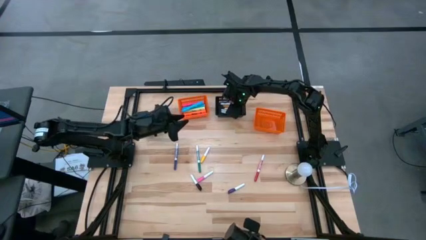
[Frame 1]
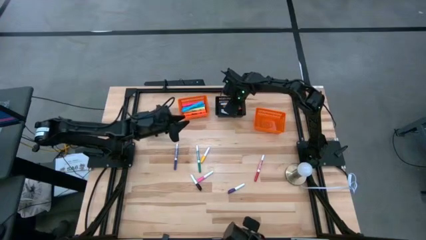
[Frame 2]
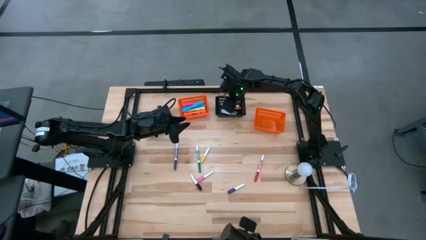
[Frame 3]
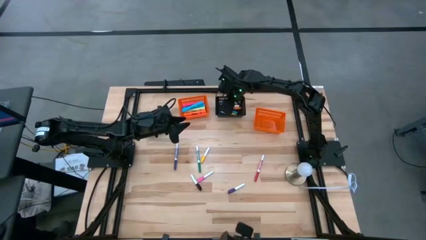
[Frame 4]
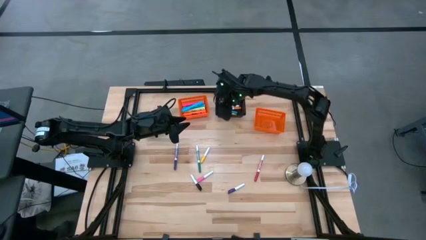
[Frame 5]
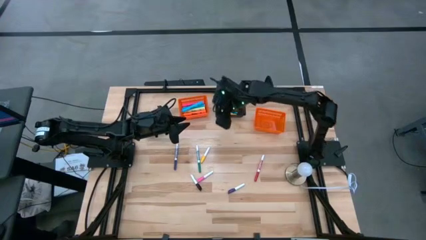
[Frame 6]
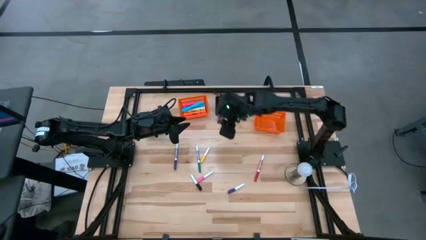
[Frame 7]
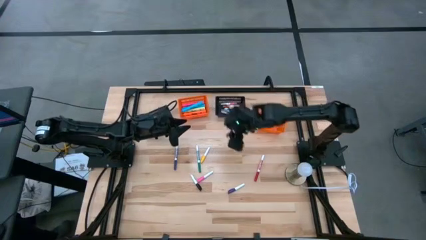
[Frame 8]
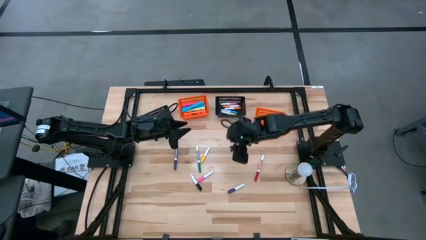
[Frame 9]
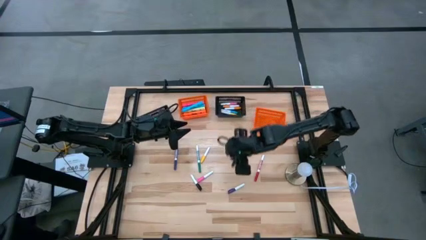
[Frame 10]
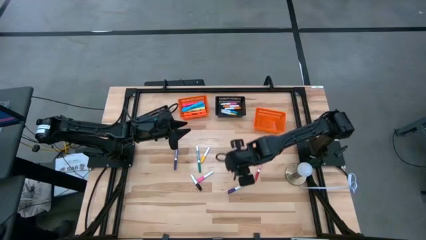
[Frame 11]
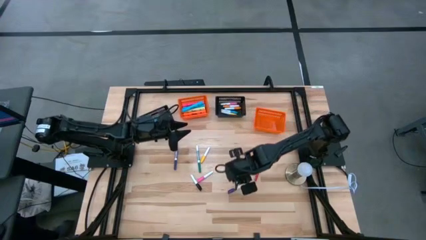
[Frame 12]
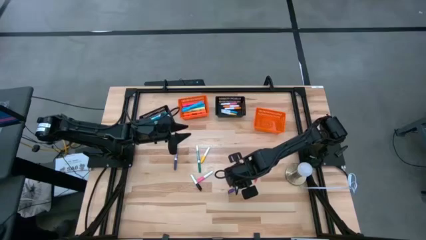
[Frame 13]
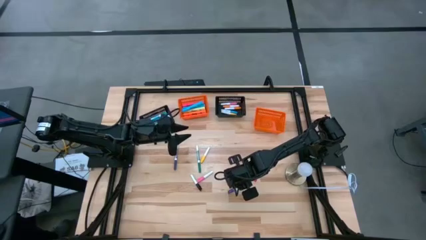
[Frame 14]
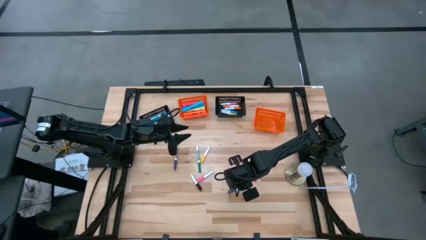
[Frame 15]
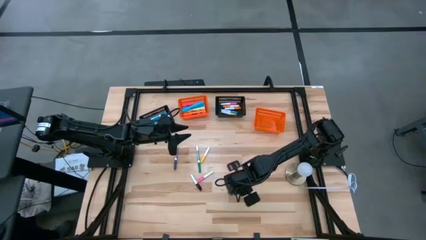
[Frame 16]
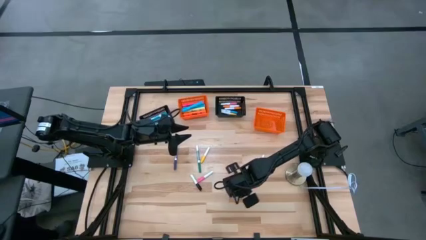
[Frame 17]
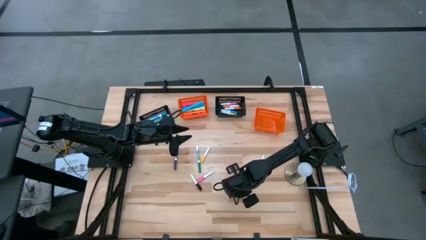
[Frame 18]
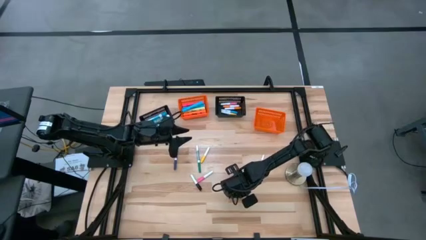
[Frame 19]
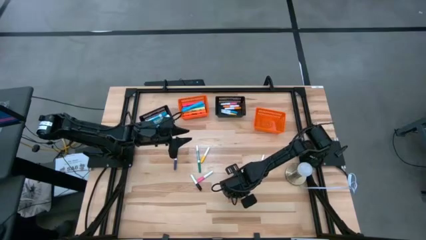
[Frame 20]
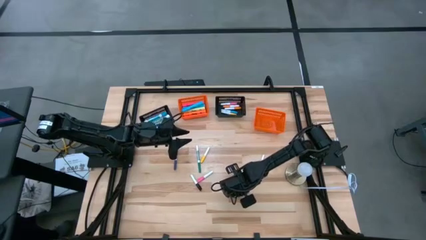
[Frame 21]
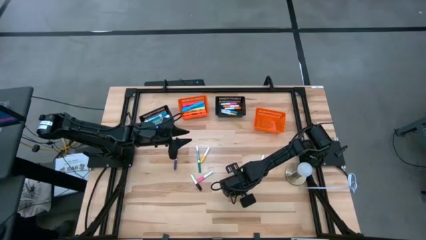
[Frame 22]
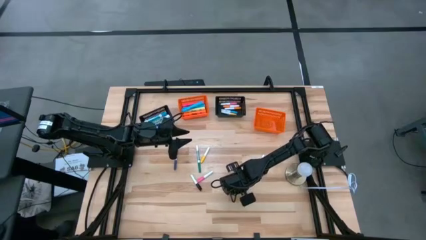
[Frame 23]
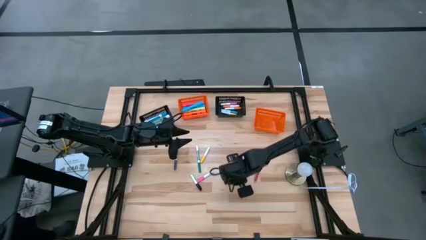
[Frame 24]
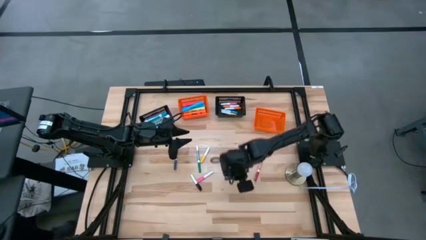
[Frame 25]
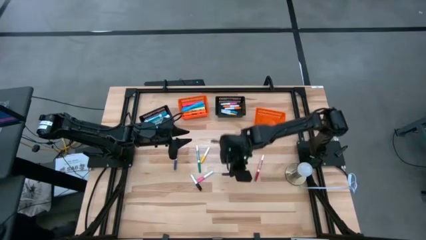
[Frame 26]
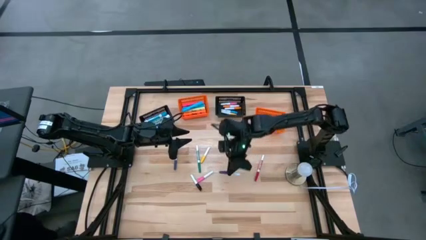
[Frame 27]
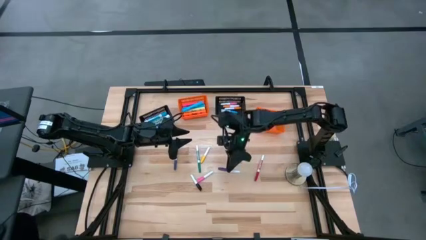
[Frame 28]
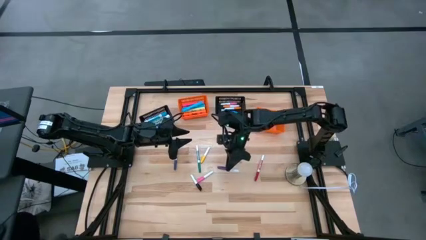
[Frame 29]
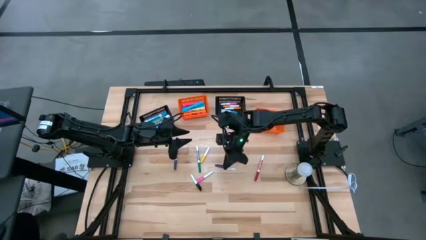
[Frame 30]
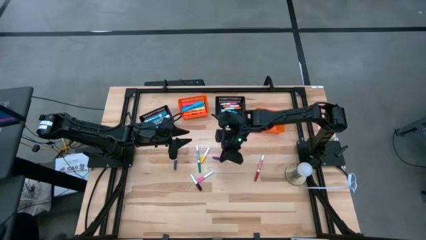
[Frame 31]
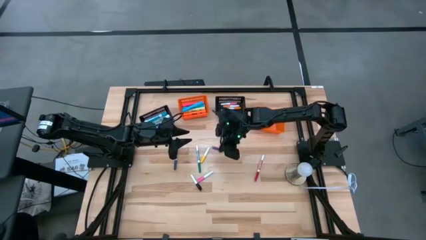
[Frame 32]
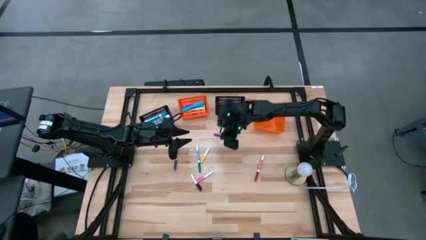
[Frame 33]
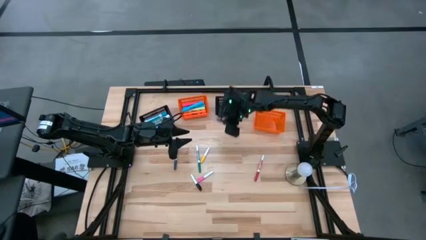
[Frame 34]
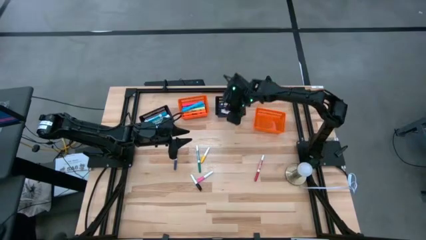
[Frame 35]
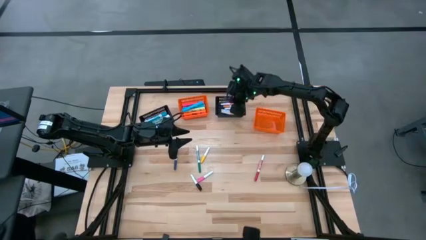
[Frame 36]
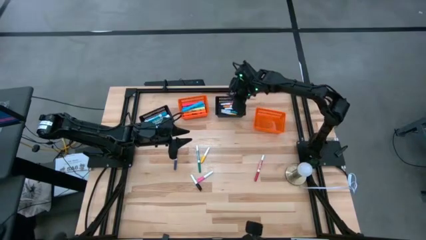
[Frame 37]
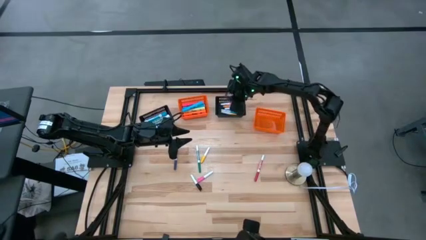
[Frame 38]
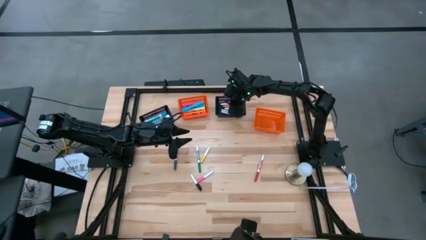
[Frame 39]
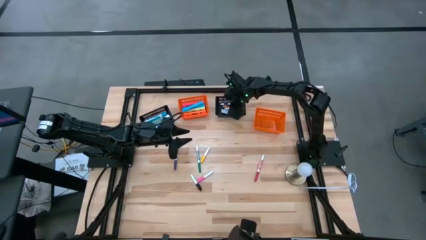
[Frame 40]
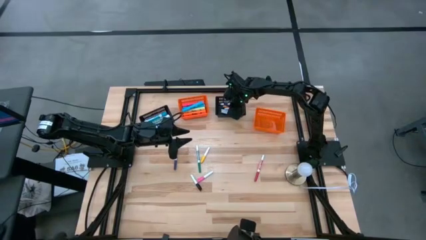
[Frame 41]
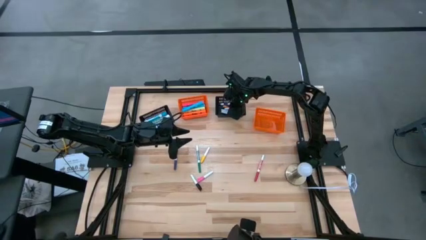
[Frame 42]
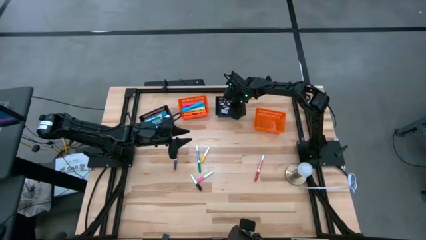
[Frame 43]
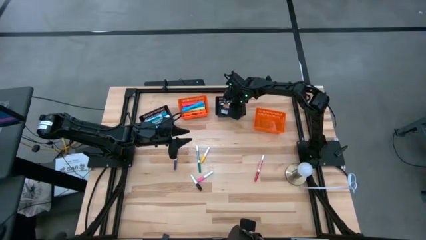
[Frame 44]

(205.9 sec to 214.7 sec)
Task: Pick & Place Markers
Put the small purple highlighter pen into the right black bin

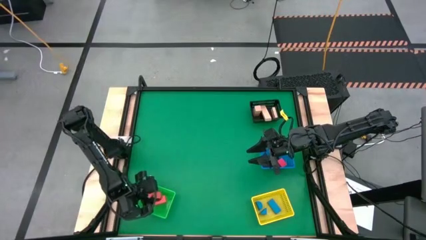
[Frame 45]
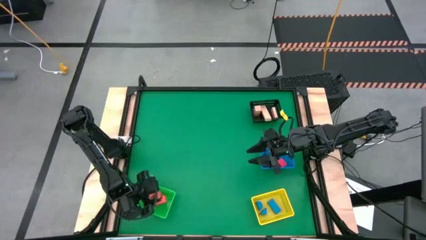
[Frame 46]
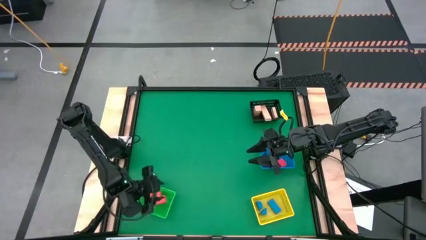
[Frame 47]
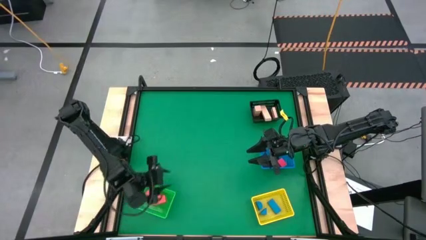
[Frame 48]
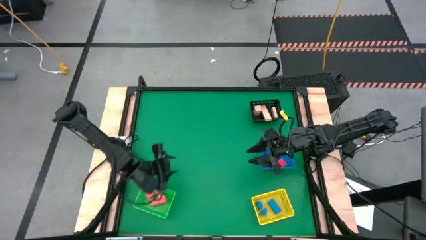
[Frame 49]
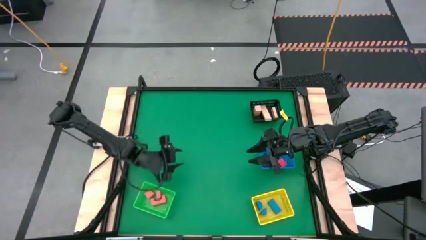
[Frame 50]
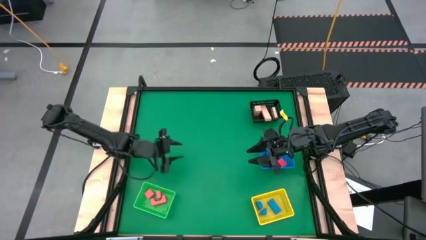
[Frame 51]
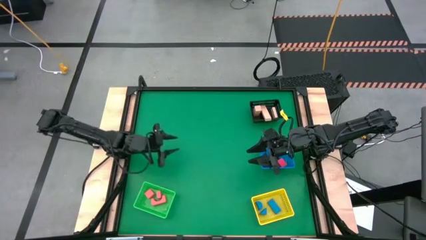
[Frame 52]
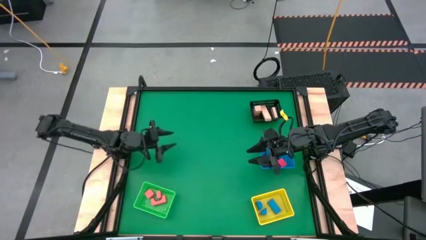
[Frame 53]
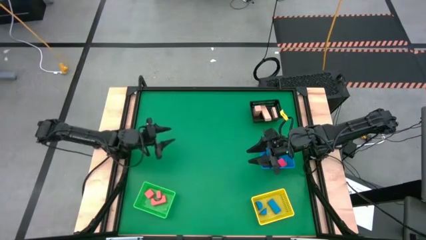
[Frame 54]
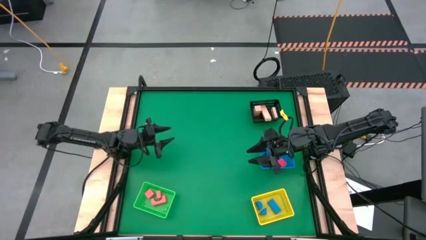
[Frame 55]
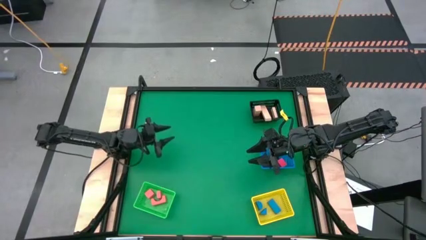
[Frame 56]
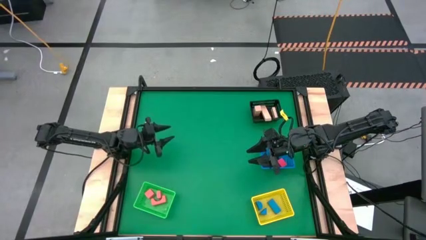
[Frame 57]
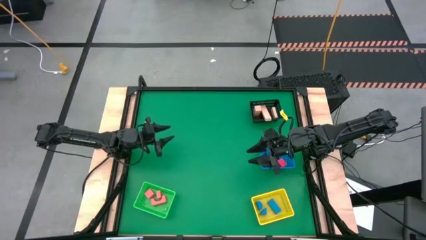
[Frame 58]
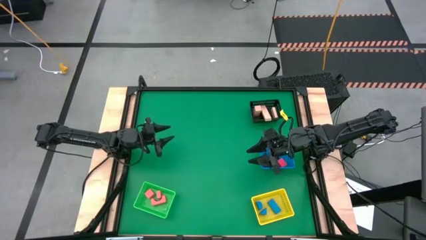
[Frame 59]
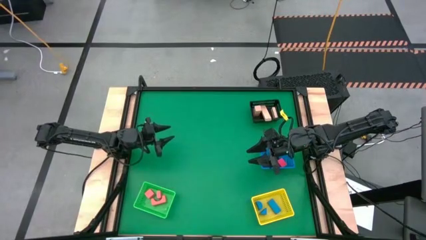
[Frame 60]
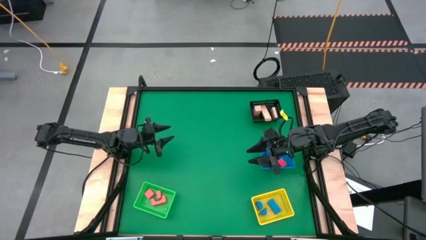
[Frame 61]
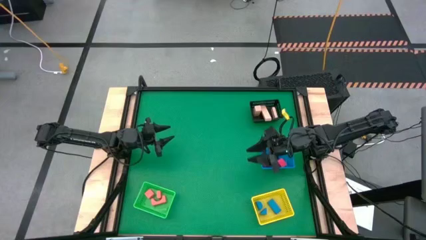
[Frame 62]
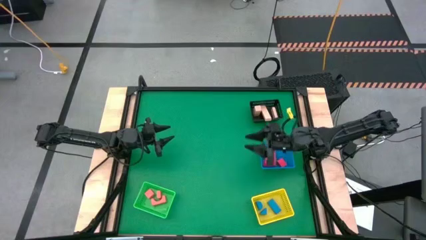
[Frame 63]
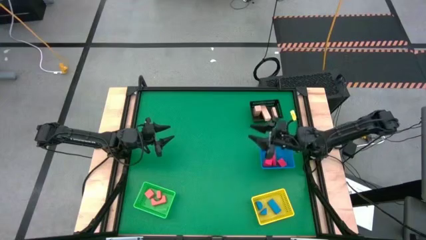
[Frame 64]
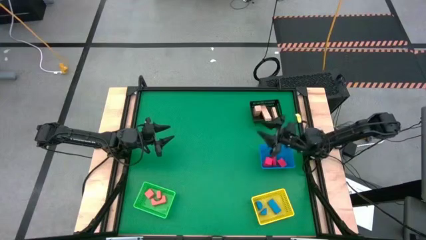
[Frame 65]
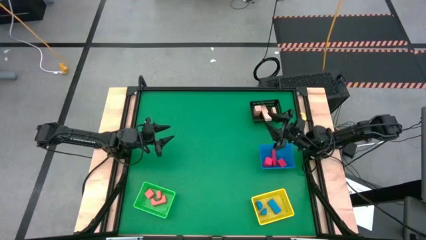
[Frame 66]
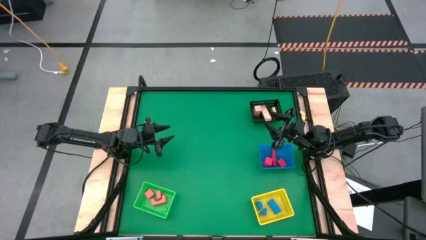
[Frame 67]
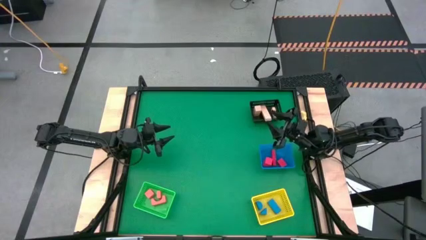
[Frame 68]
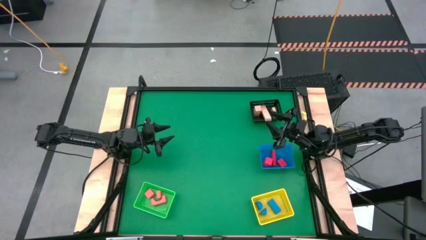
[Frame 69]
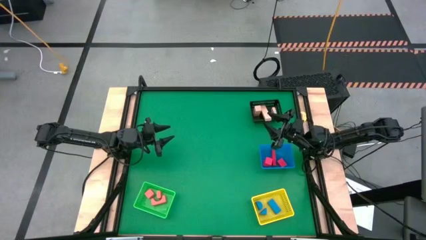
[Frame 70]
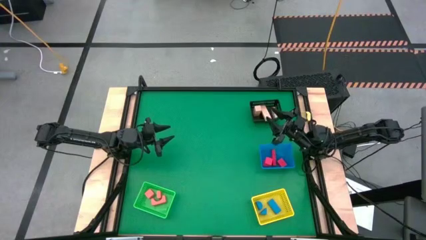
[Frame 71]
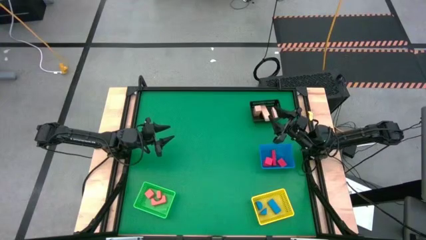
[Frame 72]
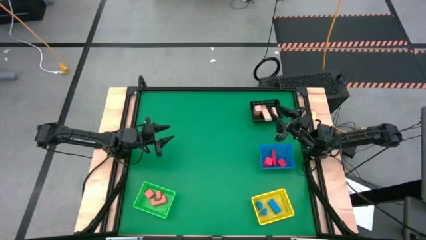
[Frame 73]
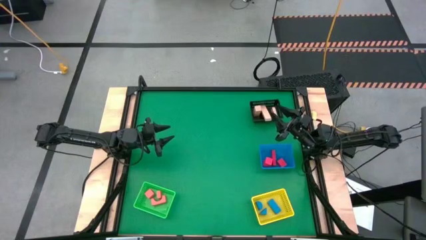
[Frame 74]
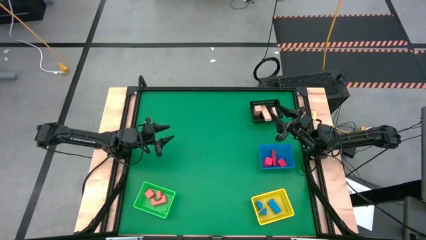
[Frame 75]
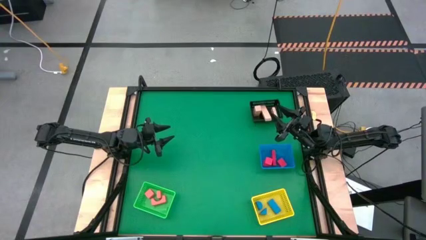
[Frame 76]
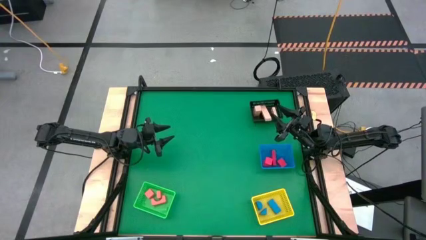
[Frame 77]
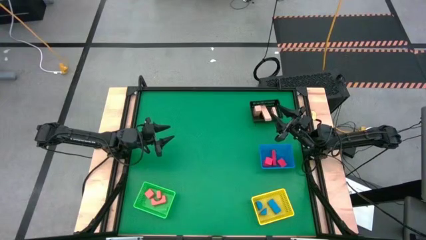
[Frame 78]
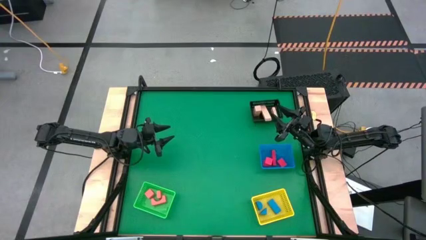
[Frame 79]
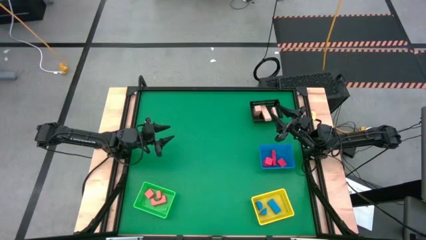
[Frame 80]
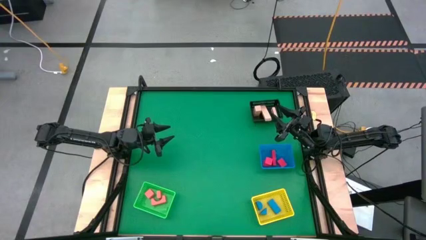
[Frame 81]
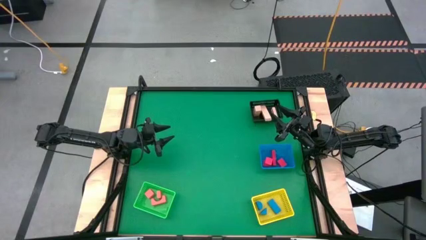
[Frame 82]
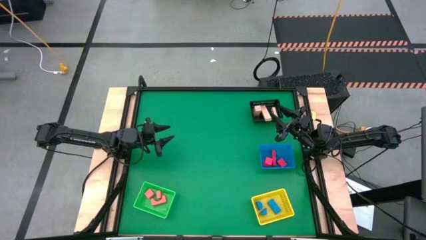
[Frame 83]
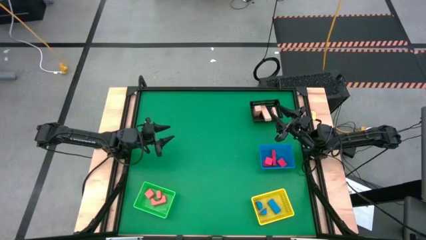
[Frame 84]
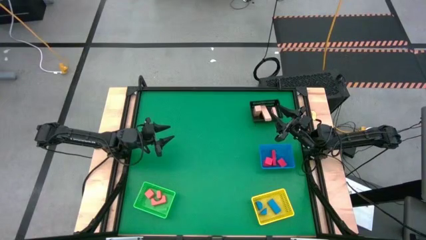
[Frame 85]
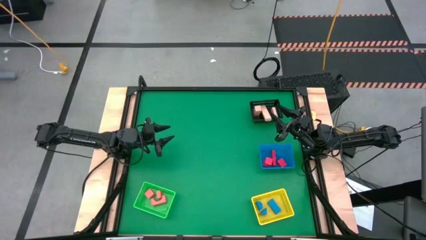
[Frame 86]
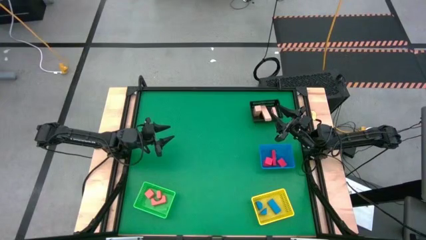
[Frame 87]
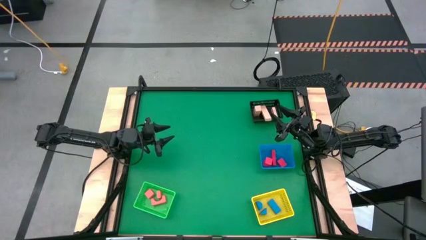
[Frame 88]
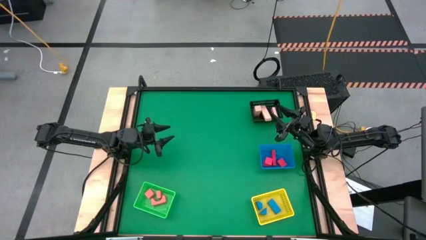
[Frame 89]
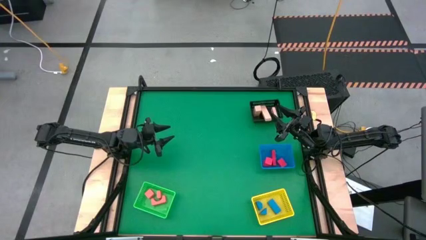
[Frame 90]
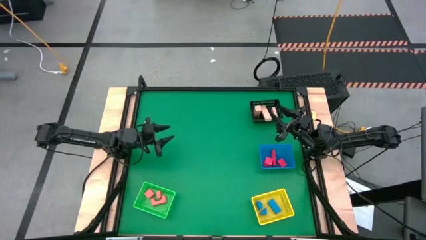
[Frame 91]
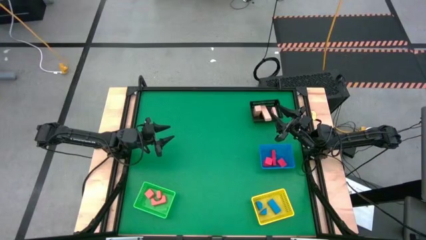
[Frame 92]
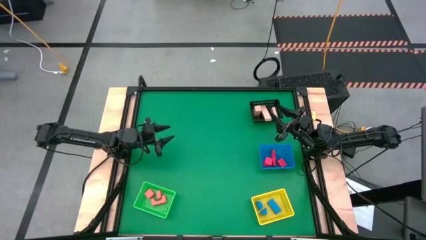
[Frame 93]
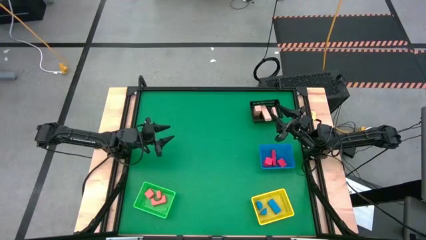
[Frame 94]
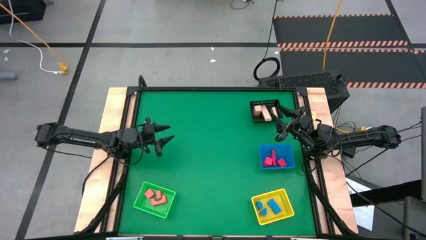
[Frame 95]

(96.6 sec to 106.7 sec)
Task: Sort & place blocks by color
Return to Home Position
